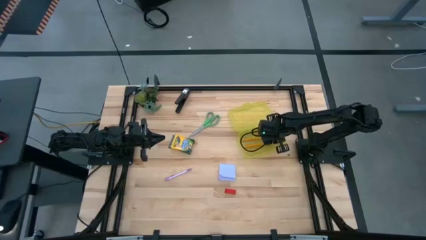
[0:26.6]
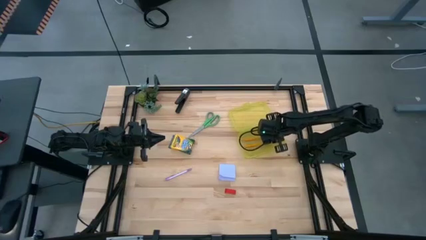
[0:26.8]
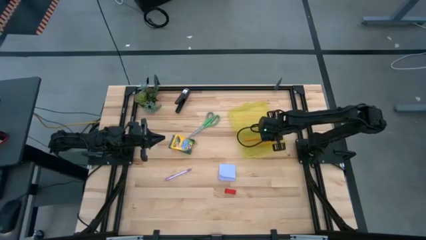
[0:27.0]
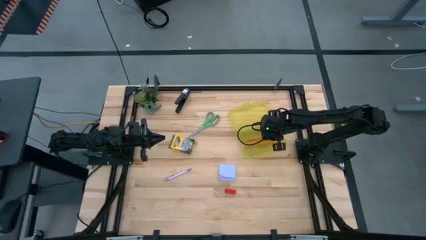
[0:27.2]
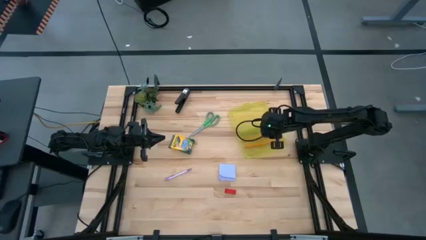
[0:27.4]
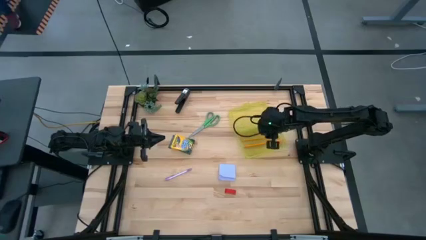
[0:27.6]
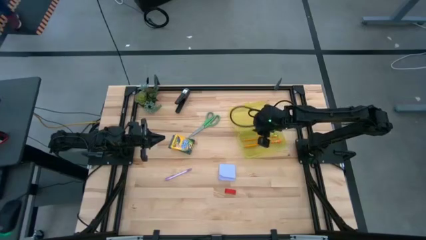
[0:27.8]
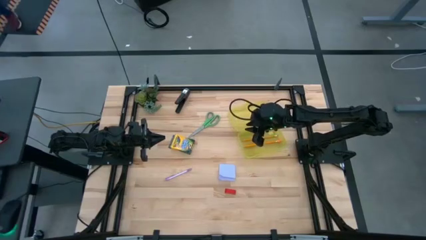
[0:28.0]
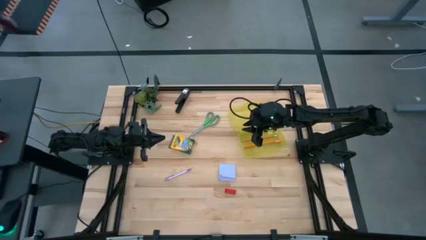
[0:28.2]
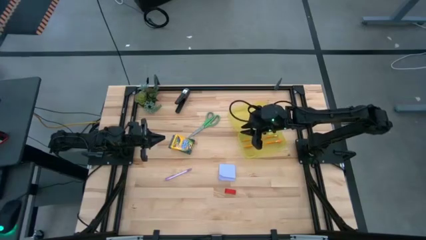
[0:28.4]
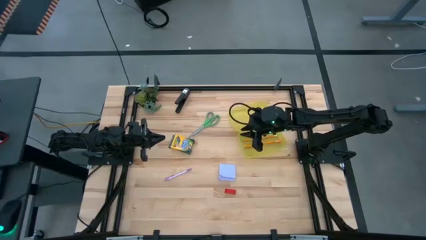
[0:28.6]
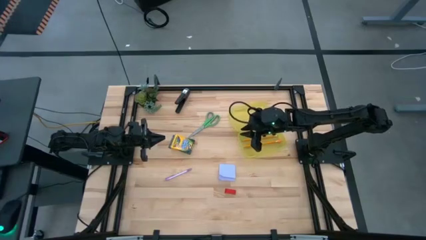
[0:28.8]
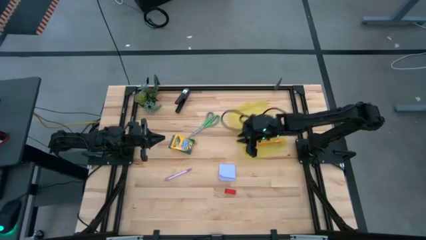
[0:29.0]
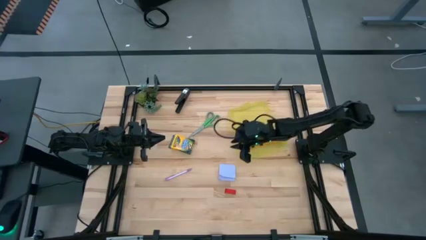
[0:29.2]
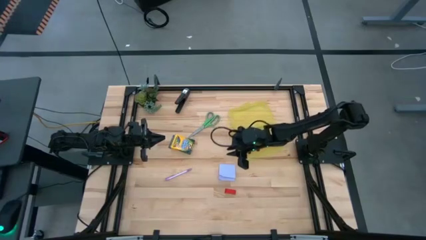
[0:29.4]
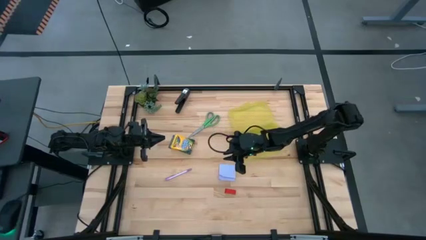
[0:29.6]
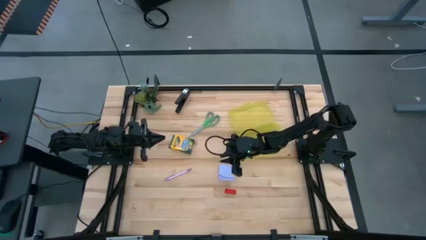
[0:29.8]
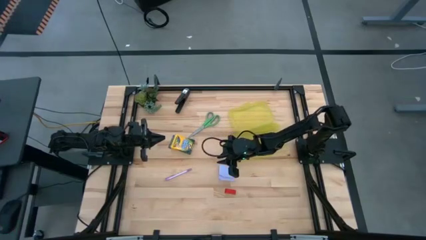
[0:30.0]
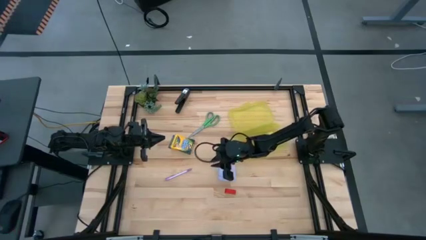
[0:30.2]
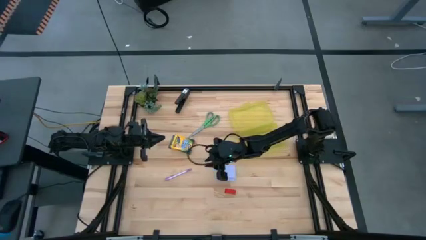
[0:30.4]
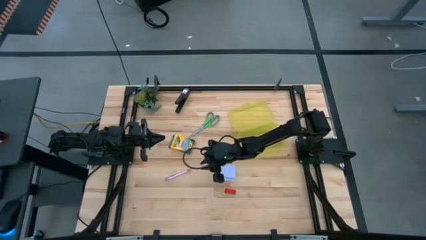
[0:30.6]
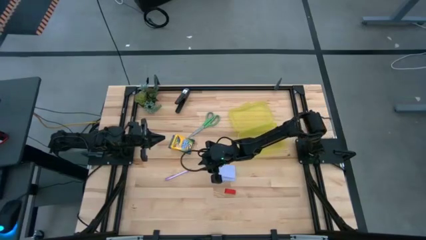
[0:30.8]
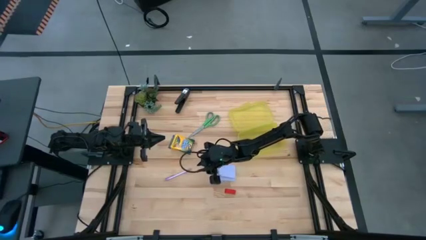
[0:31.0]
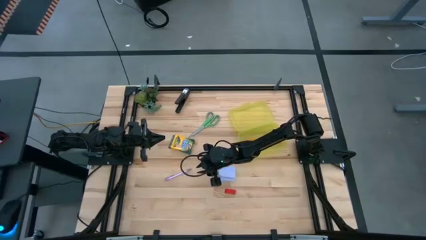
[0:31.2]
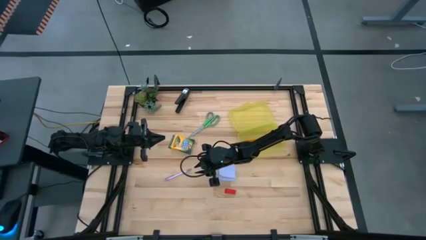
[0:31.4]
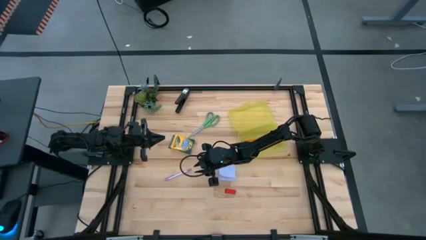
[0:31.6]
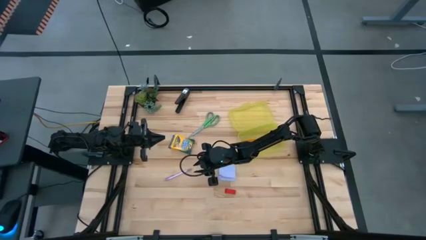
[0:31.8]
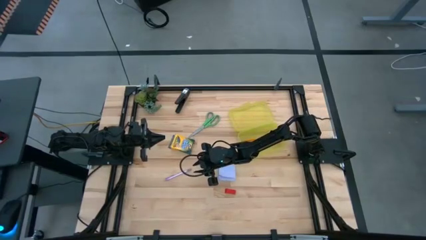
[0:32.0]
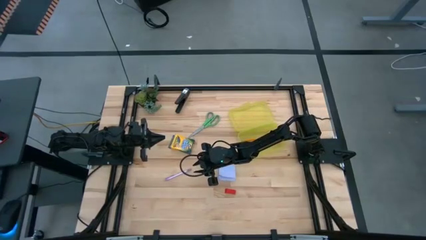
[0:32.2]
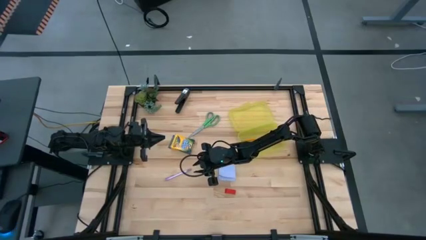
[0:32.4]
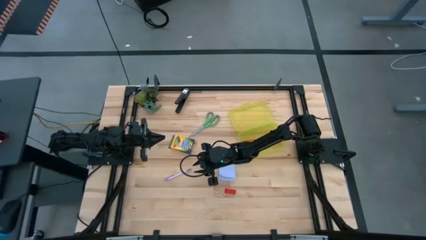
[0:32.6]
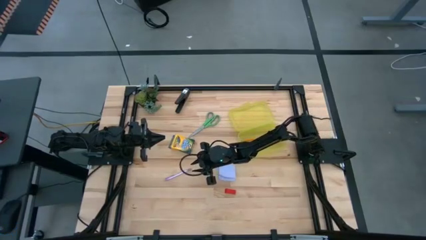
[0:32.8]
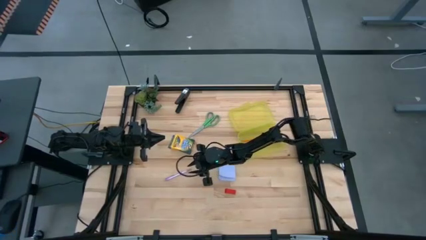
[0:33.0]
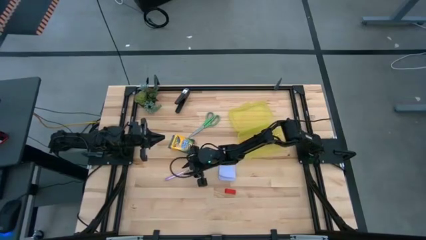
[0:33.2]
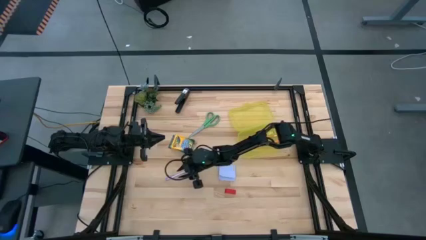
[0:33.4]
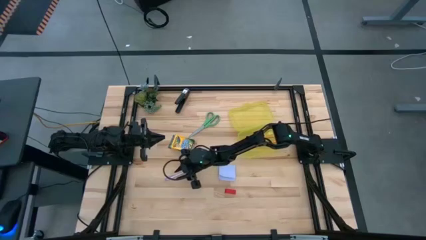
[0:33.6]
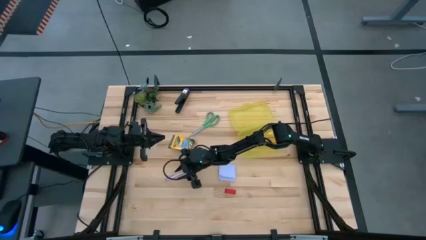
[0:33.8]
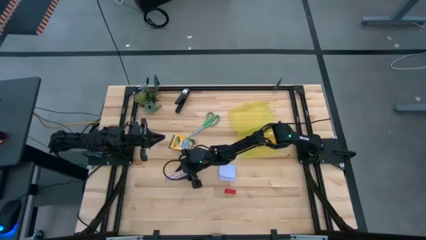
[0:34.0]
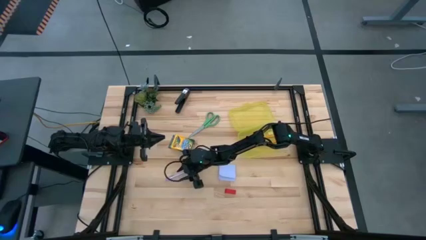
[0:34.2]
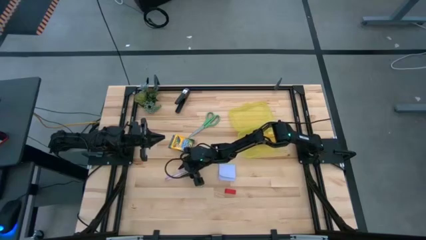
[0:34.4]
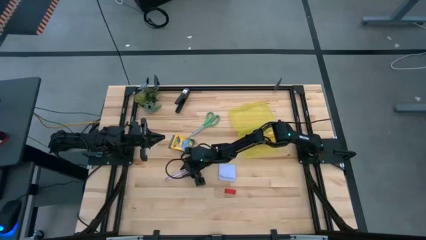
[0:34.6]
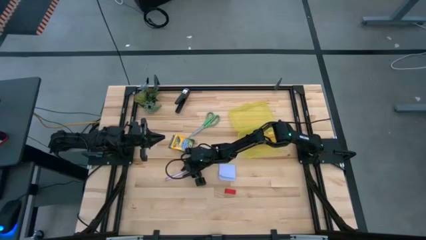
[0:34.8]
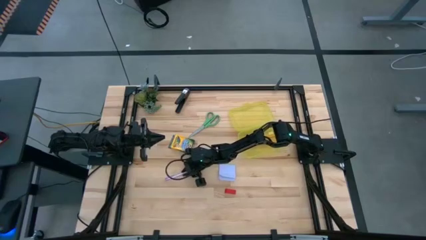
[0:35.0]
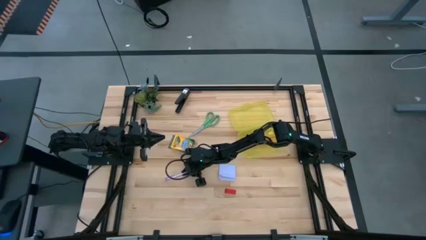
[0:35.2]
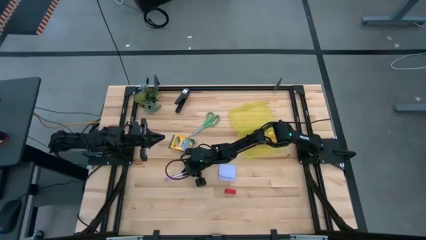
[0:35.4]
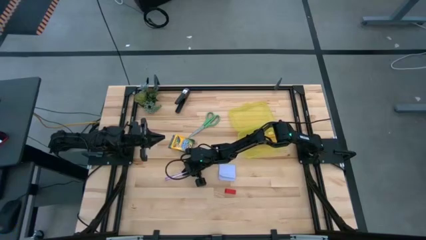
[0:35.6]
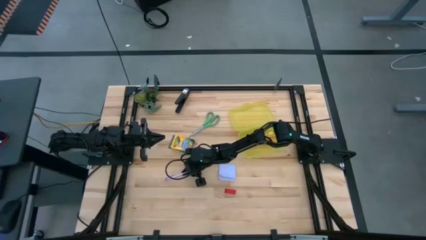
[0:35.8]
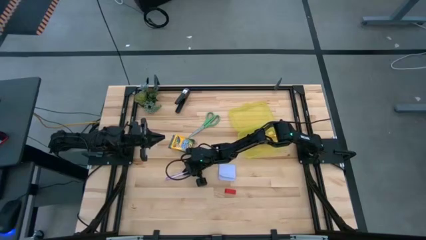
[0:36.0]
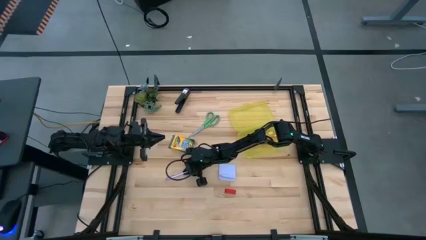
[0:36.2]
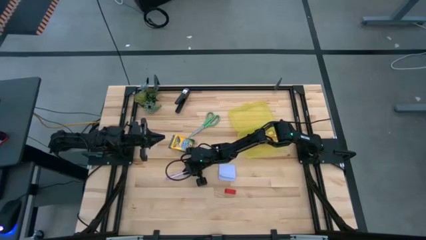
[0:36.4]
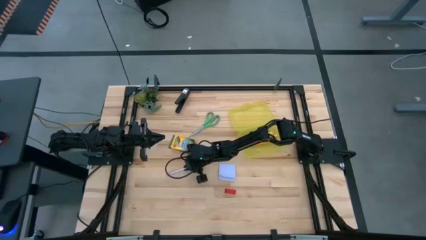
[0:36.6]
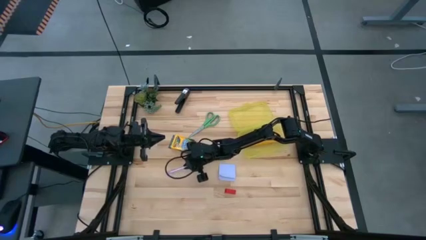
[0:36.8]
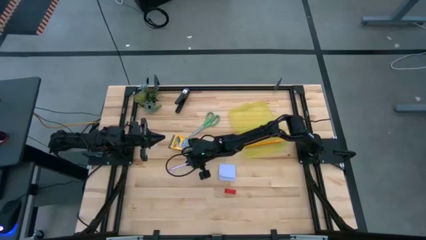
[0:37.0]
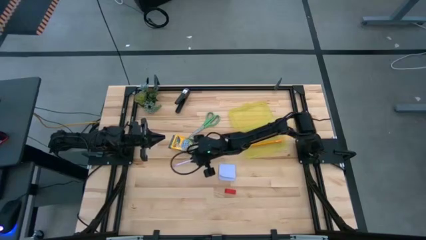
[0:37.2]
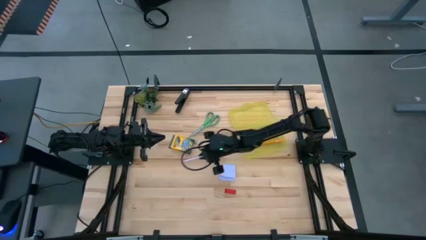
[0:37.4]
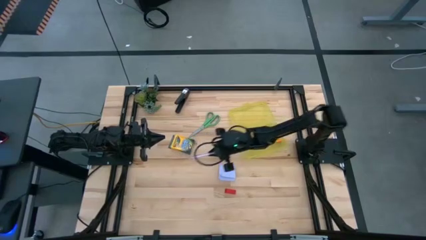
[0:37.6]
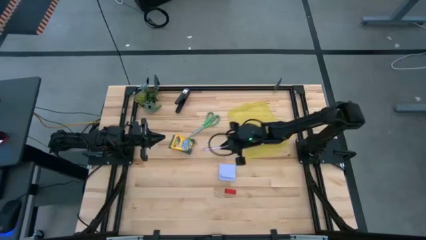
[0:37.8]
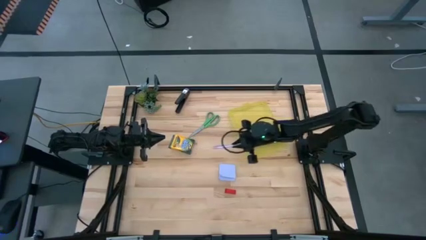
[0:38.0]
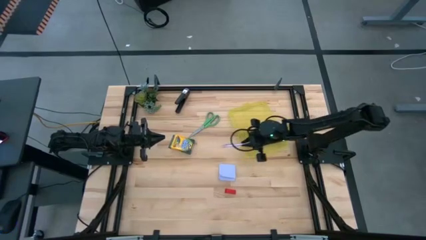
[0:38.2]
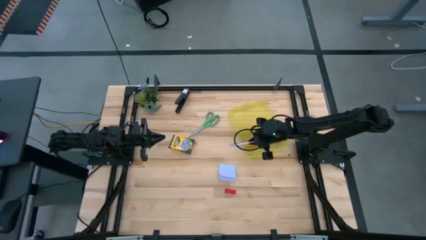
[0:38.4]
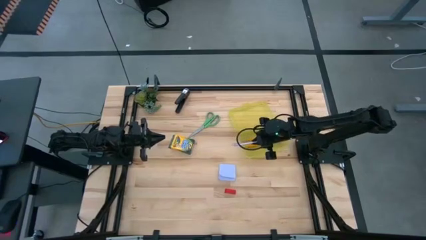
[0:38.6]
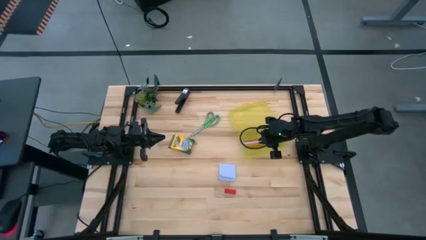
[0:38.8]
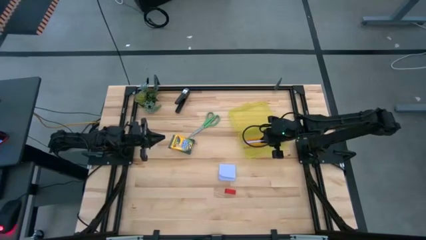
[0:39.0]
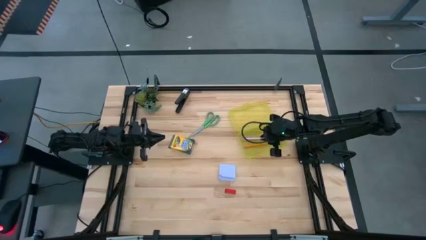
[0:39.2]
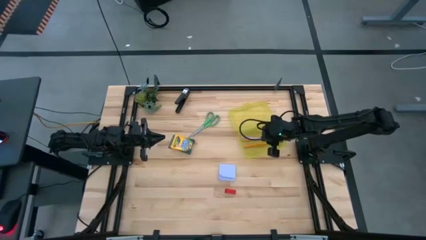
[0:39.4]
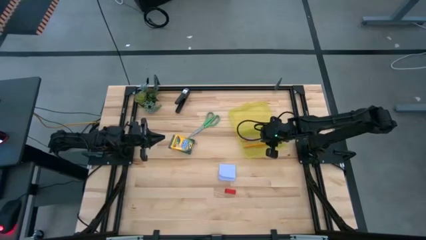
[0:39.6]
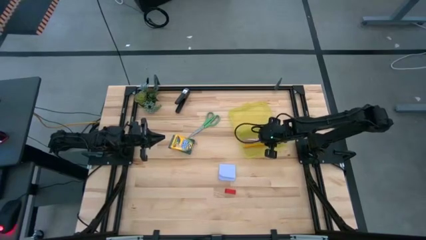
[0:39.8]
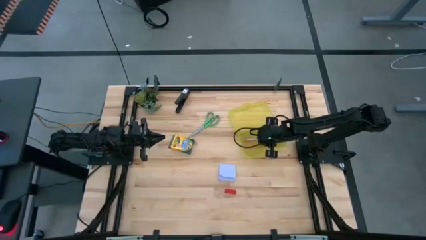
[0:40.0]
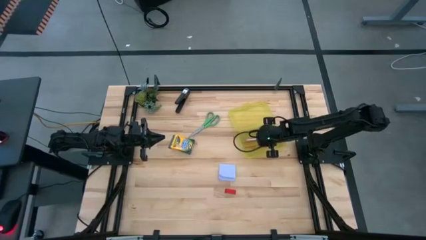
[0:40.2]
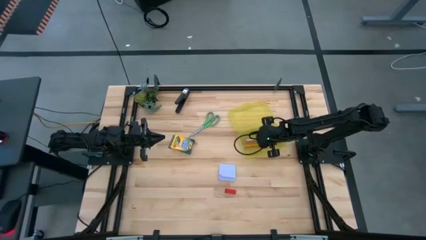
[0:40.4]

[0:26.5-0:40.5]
Task: Pack school essentials
Put the violet pen into the yellow supply box

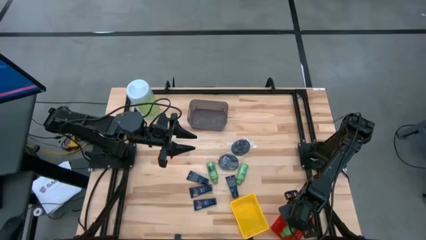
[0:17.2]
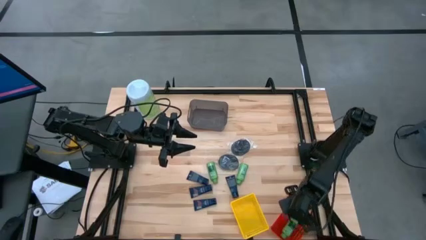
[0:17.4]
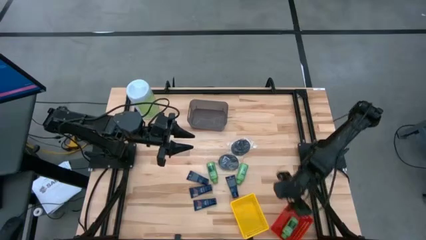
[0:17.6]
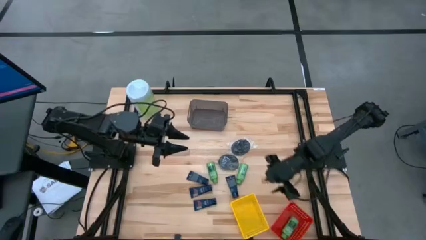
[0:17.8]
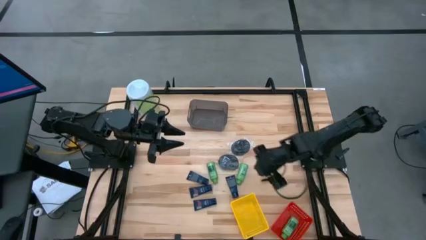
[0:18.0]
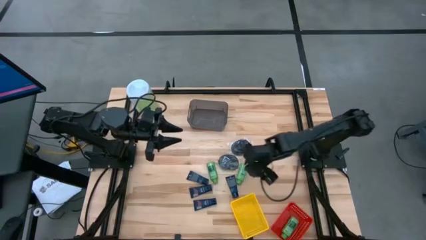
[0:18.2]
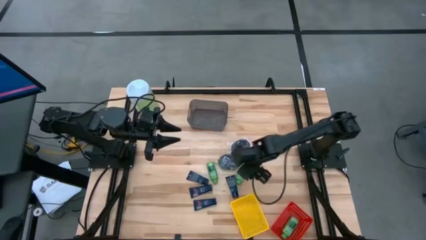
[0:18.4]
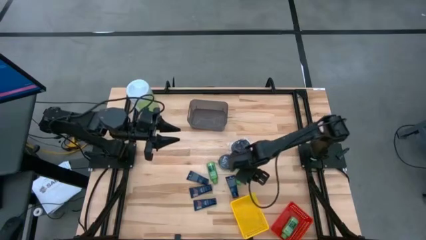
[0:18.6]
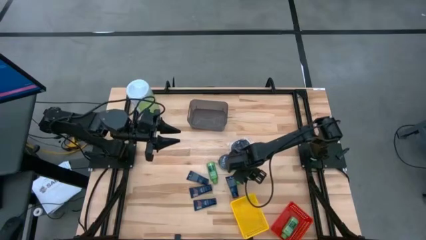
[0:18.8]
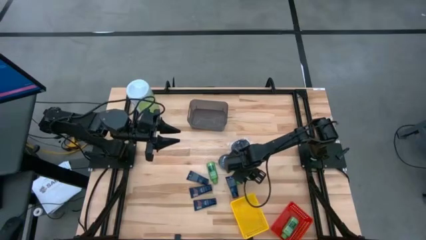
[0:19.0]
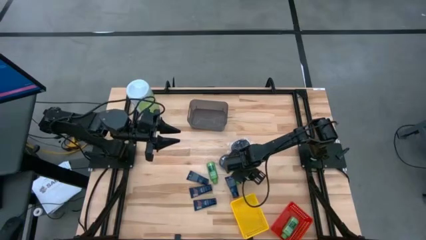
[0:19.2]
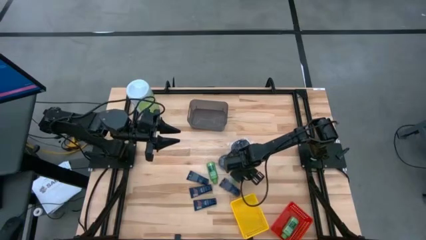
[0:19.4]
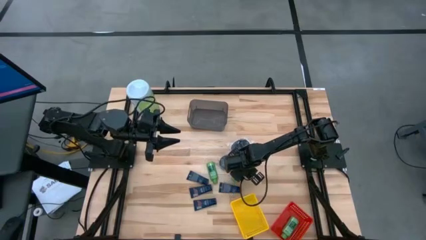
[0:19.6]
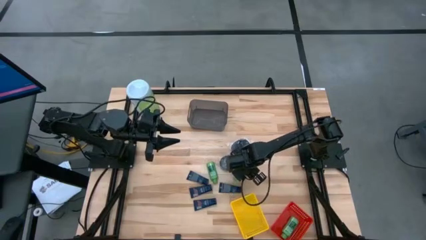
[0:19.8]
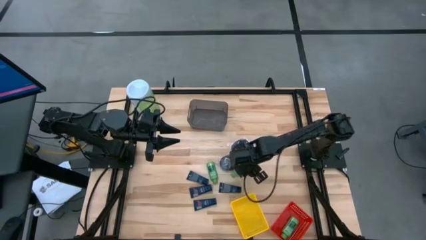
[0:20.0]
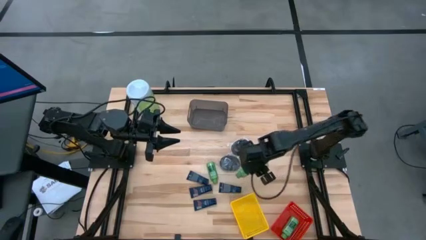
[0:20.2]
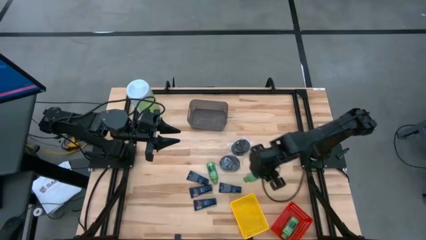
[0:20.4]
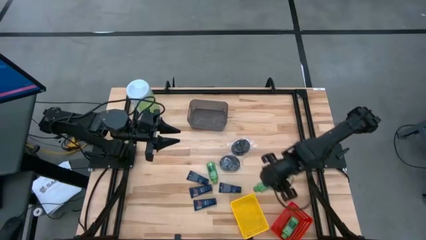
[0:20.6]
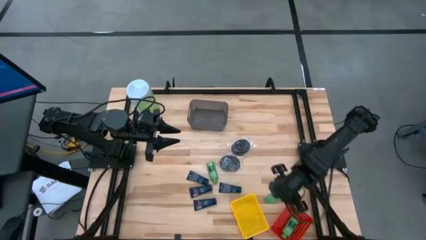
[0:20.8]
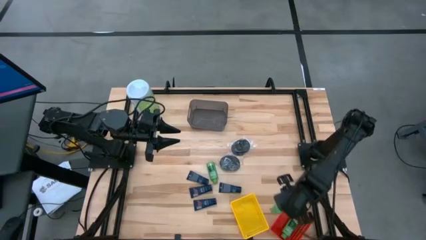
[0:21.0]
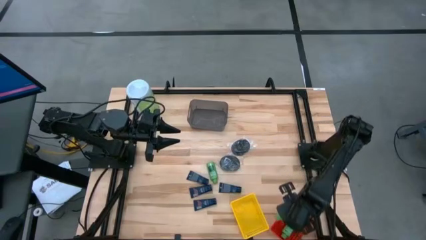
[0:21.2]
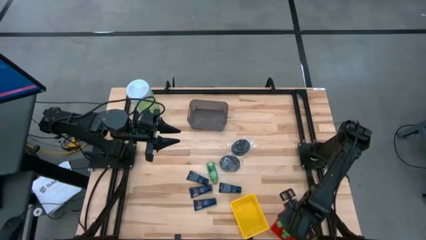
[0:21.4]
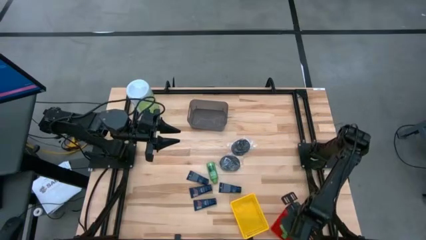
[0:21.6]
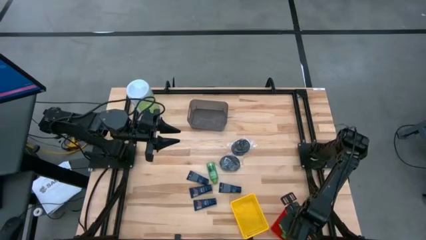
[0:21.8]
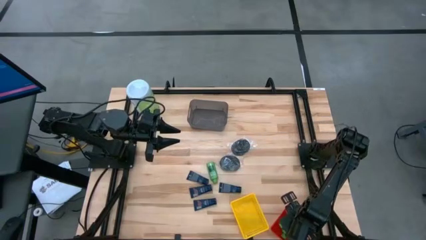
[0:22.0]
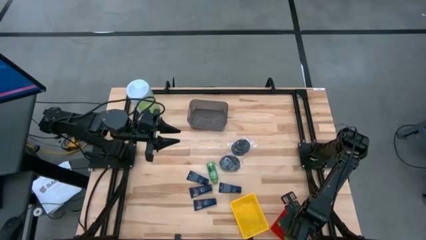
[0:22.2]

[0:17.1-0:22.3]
Task: Pick & Place Travel size toiletries
Put the green shampoo bottle on the red bin
